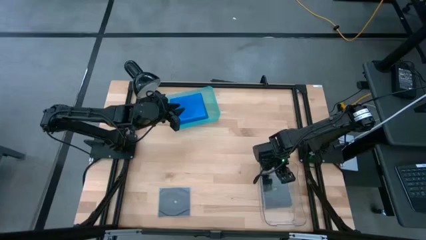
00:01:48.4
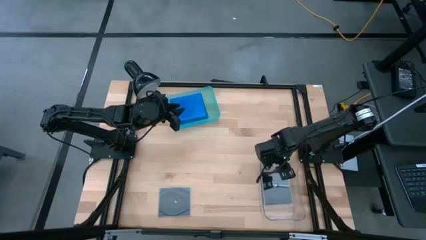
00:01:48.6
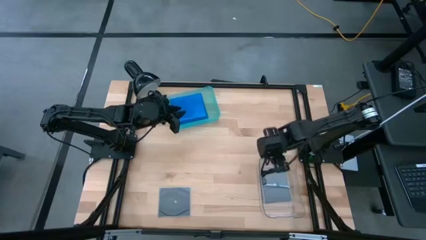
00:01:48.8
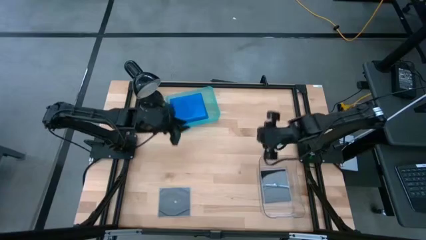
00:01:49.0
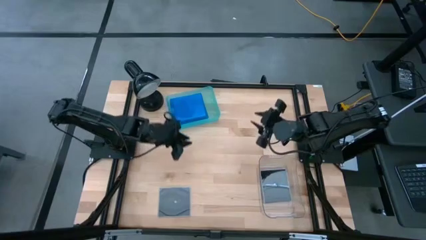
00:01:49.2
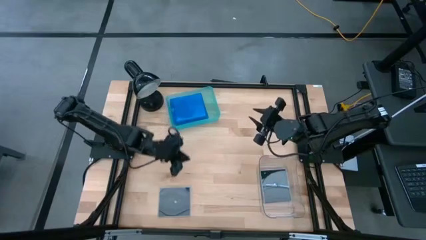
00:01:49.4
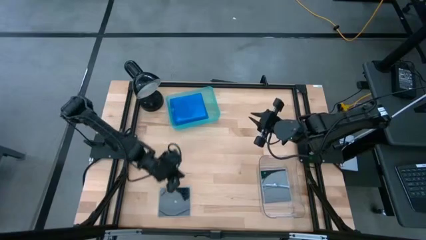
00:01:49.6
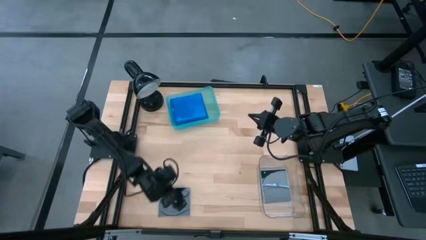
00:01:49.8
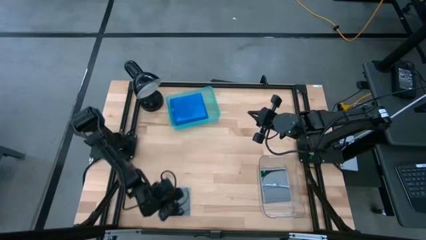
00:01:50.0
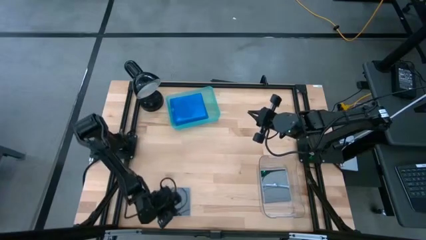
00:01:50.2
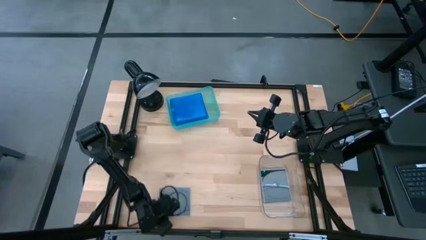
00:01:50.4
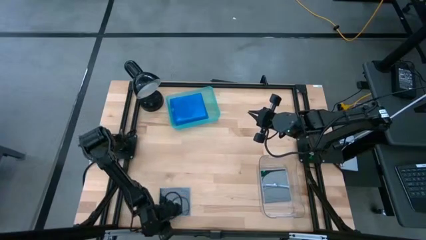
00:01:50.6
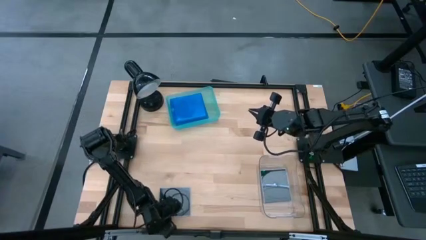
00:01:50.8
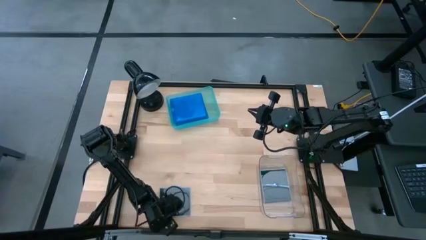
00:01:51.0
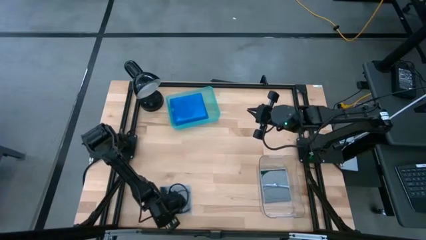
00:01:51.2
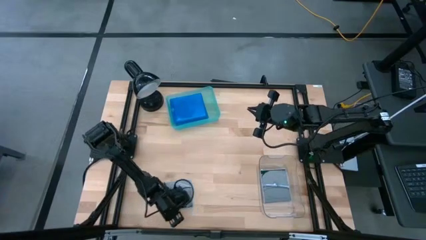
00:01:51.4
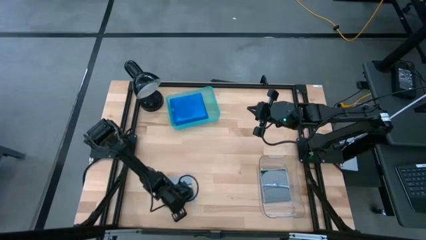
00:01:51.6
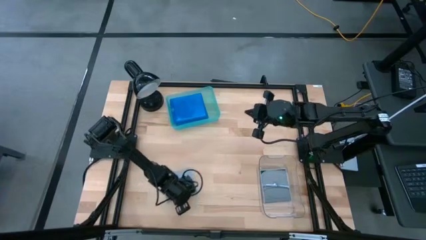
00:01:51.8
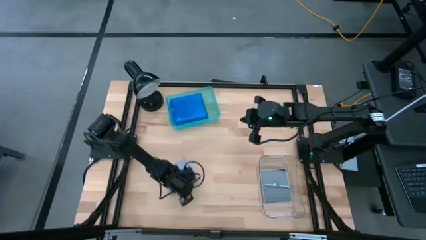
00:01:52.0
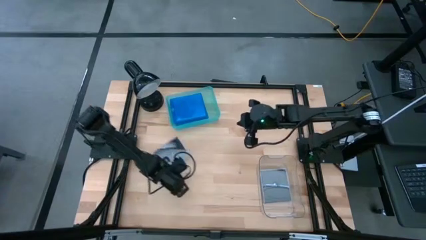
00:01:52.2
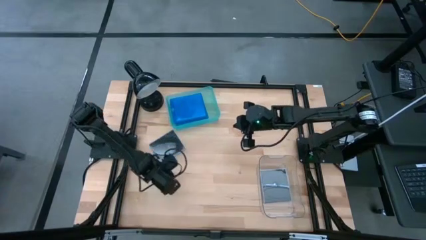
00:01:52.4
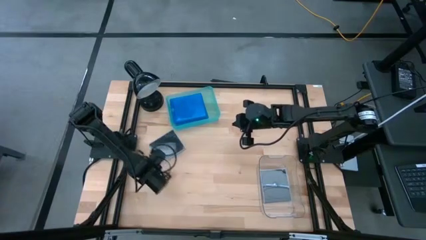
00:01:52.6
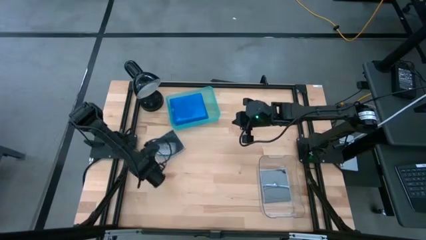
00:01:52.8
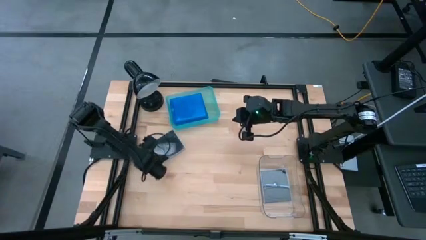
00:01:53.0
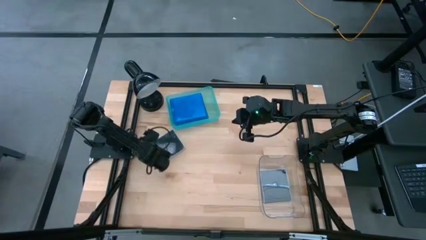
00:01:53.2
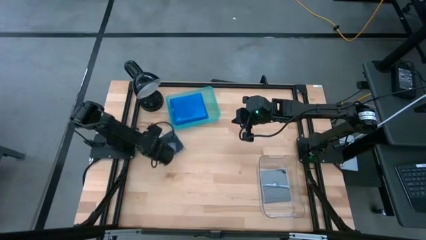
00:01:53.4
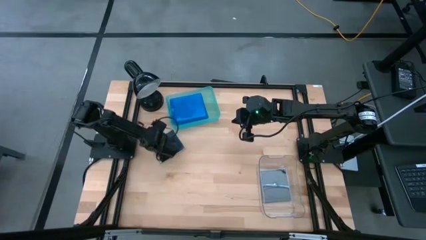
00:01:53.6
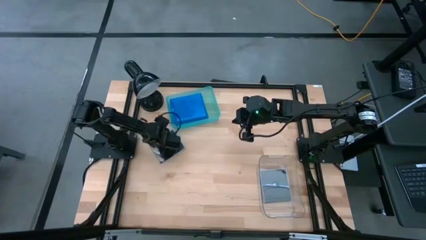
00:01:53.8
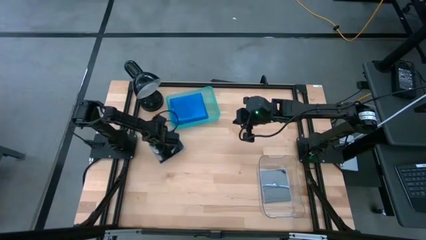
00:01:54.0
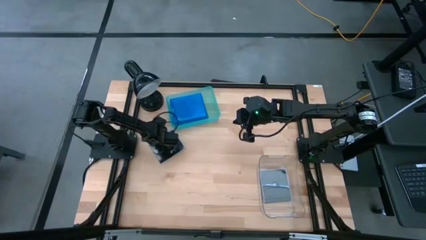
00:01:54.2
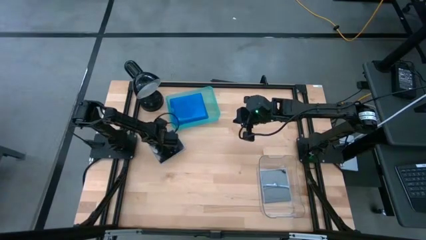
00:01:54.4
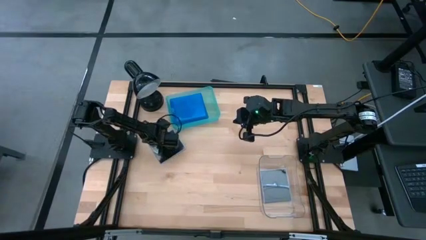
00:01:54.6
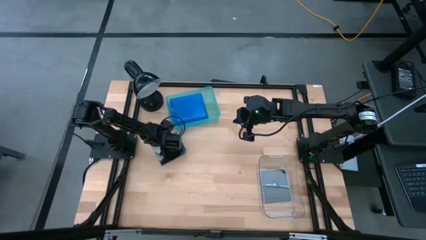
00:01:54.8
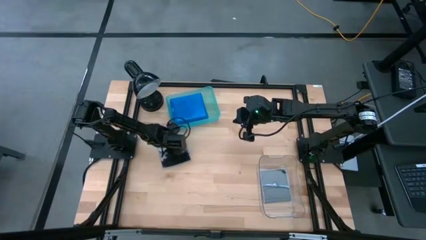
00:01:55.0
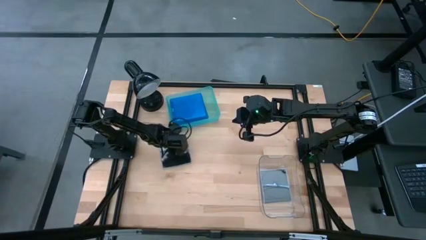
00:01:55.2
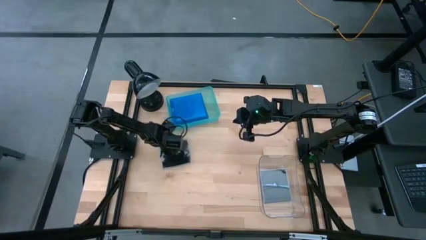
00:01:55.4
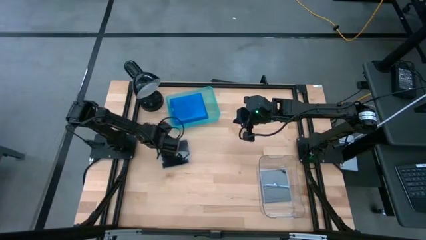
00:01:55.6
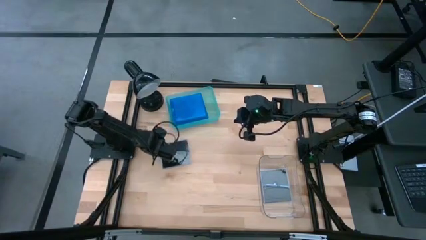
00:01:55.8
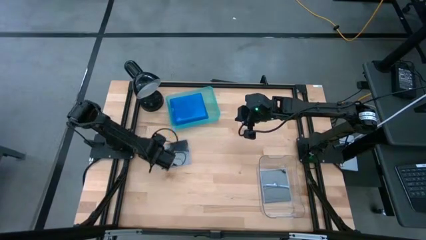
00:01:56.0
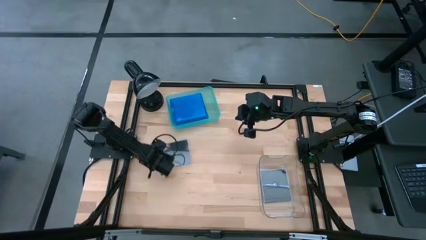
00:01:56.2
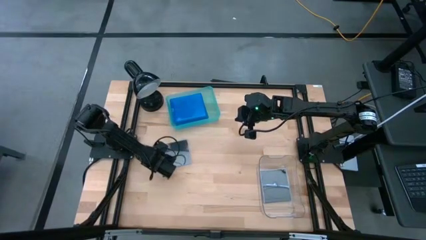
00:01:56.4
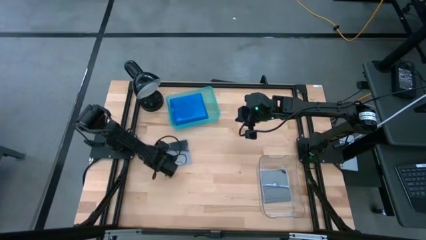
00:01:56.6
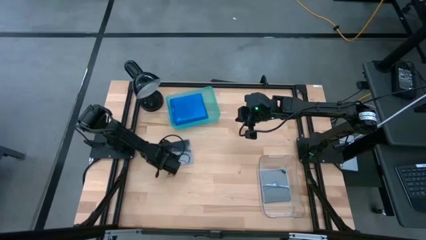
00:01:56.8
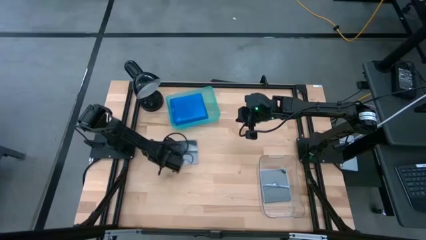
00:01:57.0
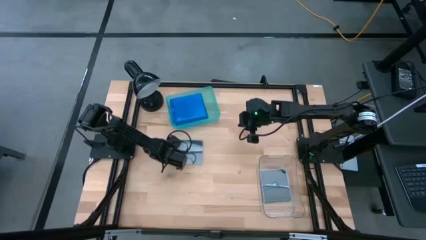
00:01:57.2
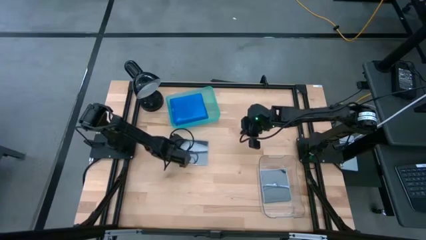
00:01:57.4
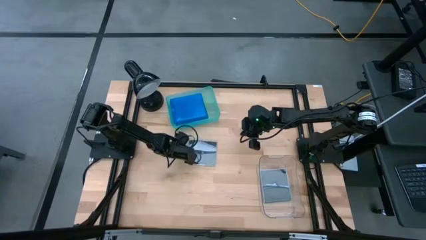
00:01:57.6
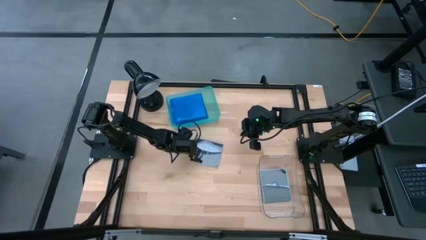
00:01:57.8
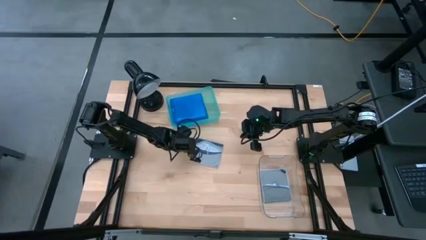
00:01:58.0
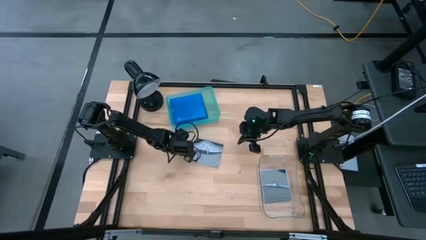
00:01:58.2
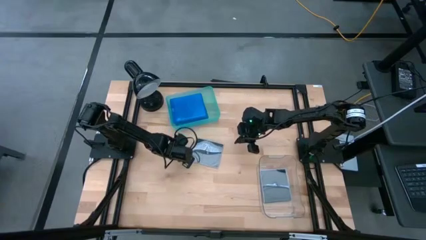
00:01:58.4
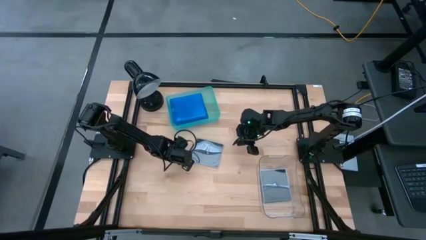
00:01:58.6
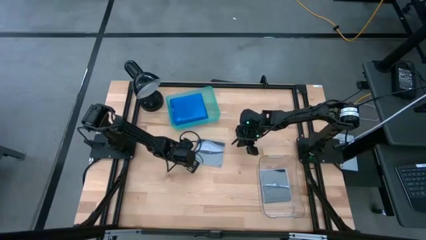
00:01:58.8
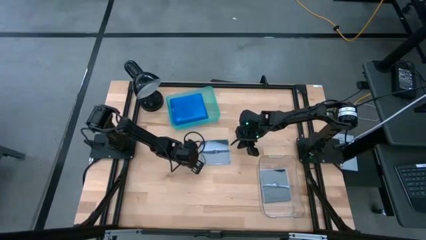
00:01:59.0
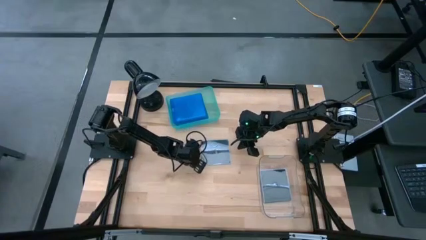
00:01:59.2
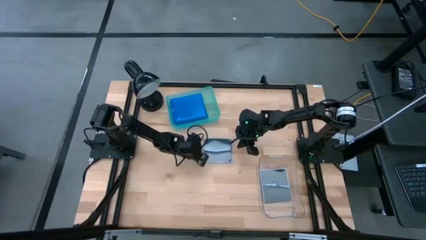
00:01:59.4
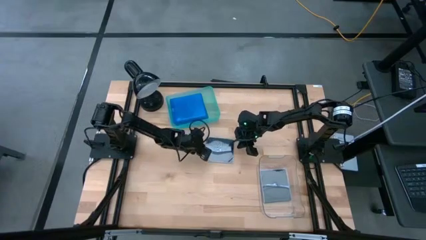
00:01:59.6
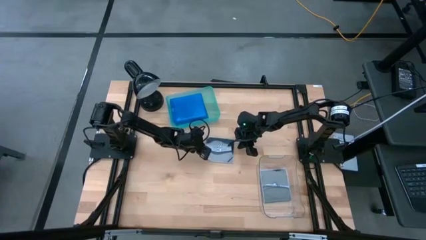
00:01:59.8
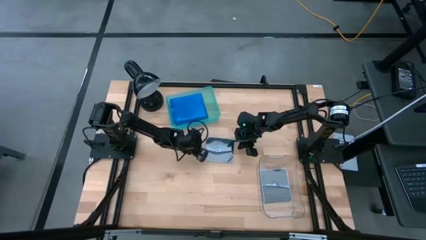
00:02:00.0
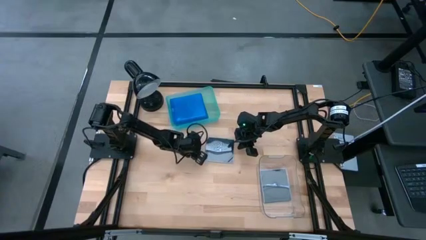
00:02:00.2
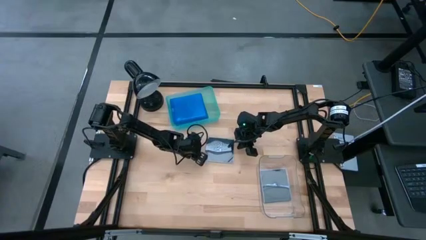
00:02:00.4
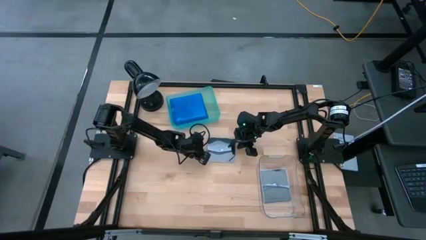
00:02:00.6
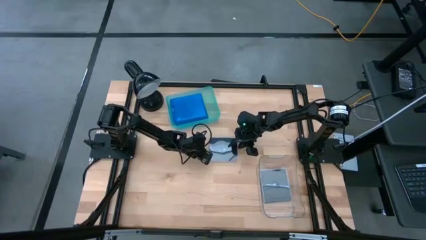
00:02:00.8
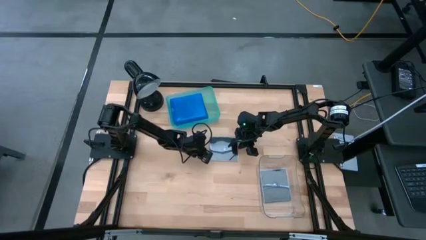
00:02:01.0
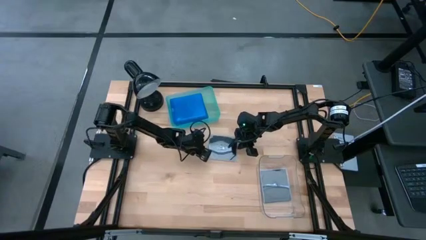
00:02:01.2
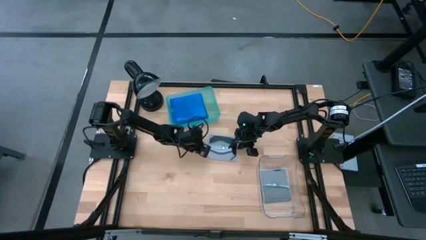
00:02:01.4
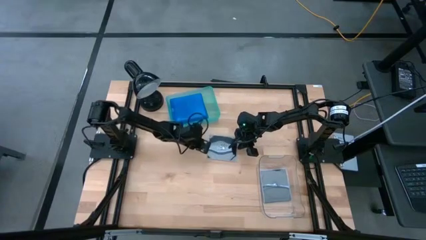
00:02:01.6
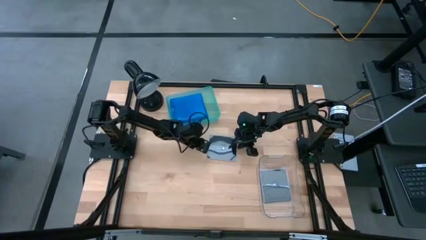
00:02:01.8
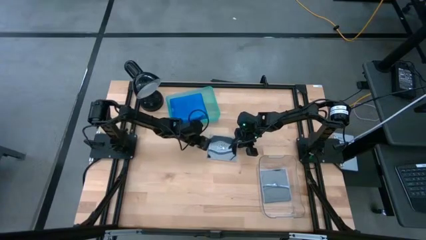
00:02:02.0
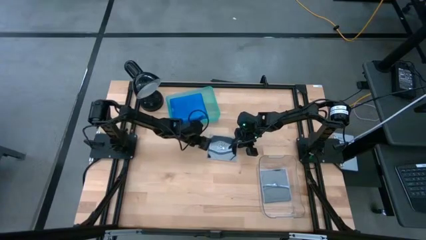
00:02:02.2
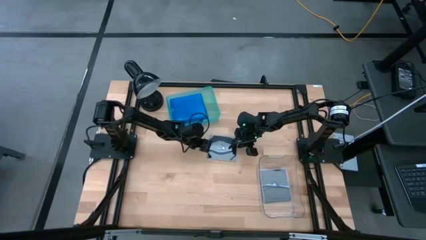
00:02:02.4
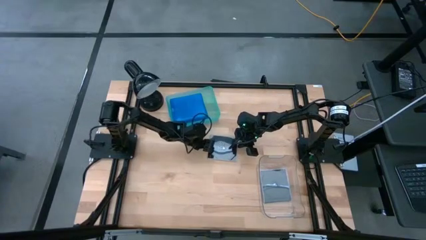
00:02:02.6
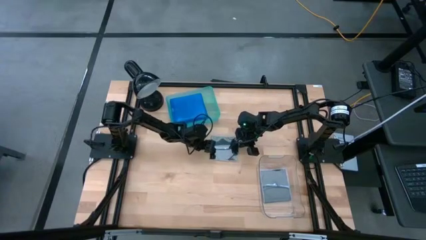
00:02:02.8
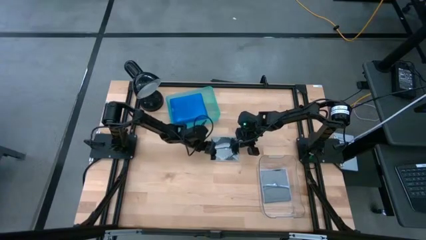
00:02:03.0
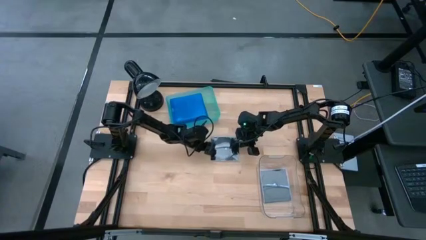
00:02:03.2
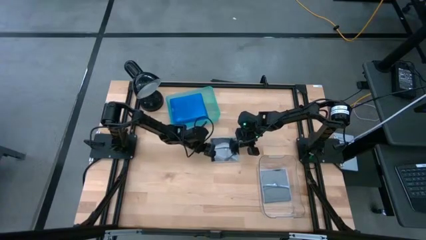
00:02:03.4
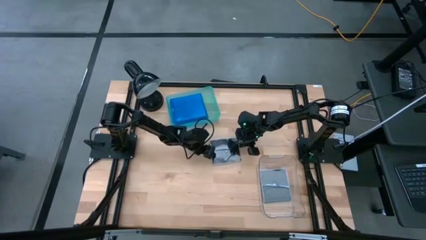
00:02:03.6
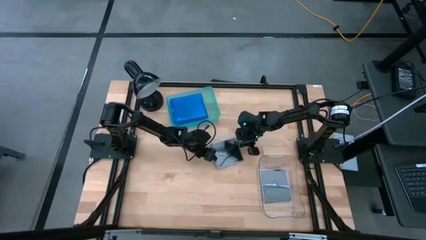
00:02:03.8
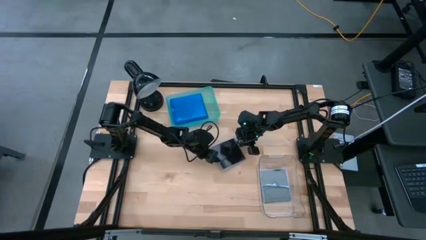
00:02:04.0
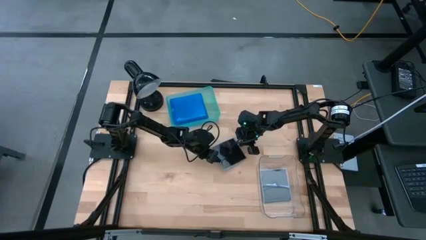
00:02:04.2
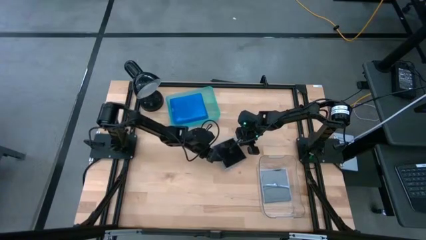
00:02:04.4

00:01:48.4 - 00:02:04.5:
Task: Pick & place jewel cases by type
Put the black CD case into the transparent bin

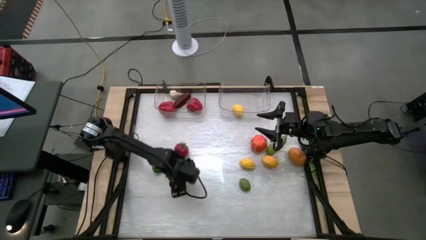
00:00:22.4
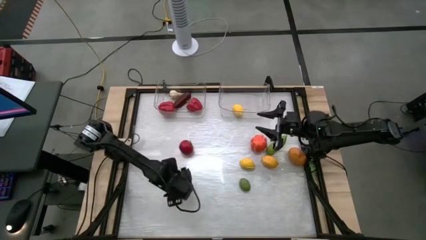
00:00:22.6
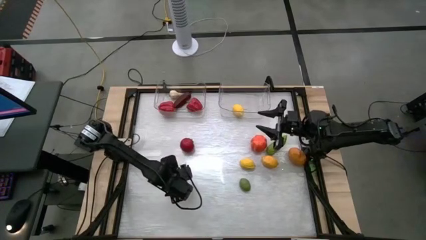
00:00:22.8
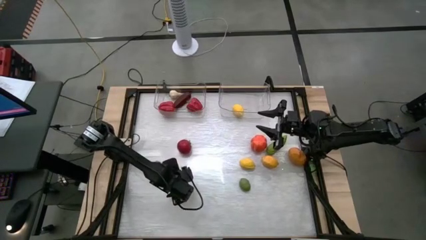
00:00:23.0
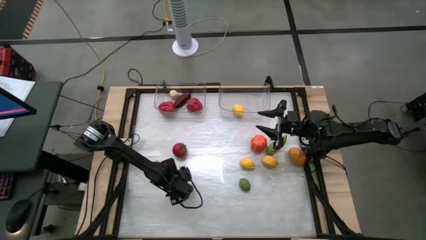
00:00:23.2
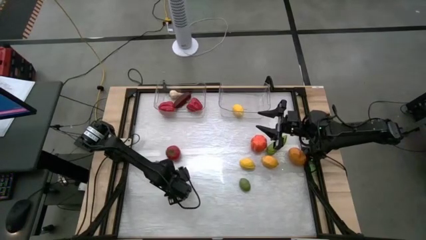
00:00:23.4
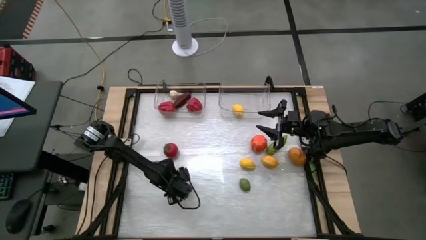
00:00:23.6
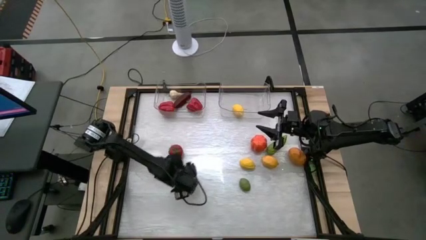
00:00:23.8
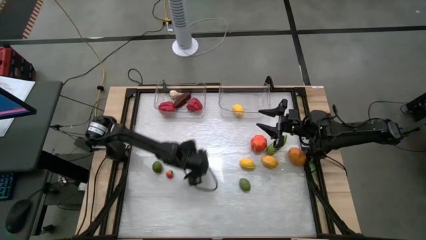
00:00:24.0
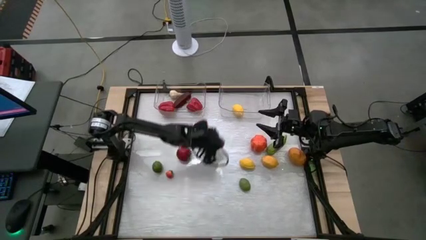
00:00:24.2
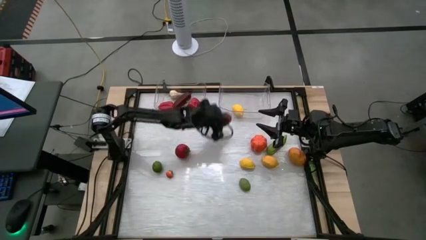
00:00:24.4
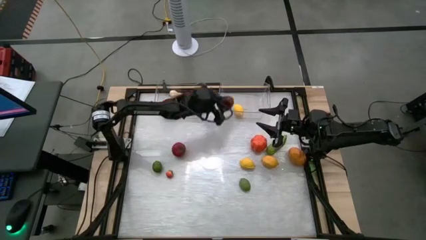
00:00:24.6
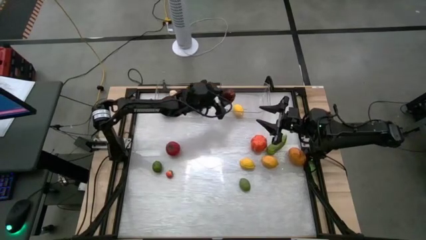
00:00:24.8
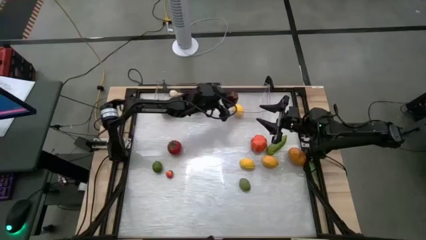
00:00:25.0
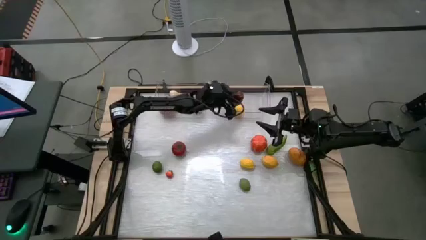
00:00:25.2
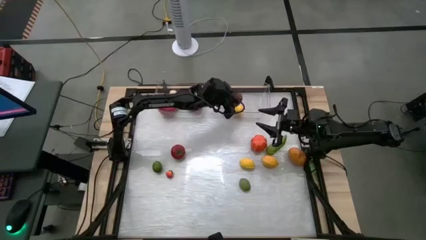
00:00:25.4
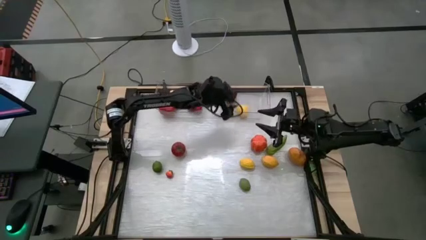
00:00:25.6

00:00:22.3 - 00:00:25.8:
Task: Sort produce into baskets
Put the apple in the container
